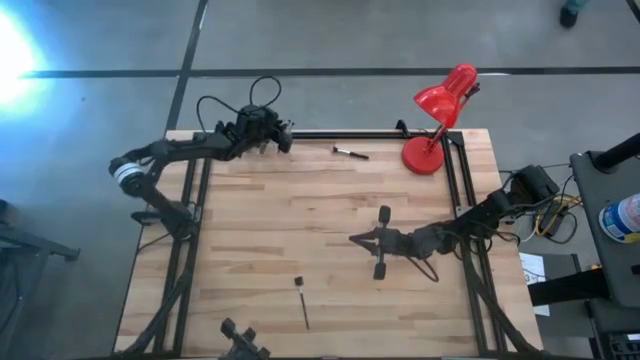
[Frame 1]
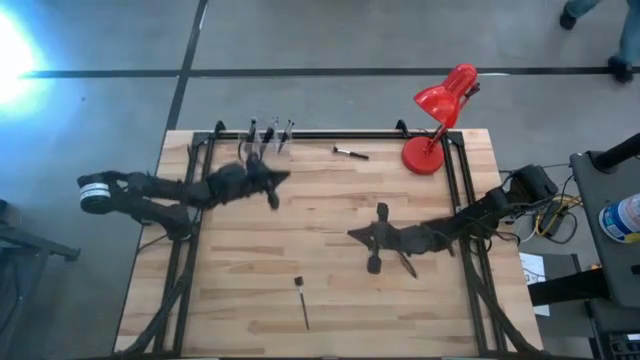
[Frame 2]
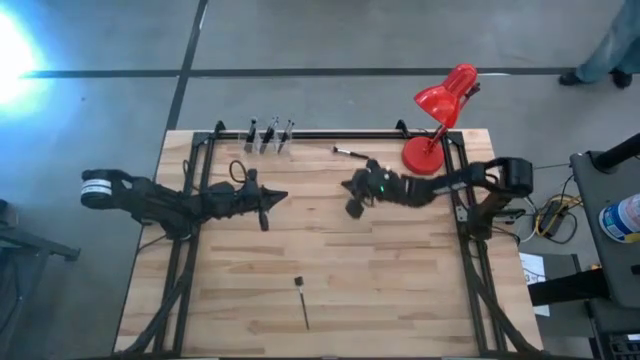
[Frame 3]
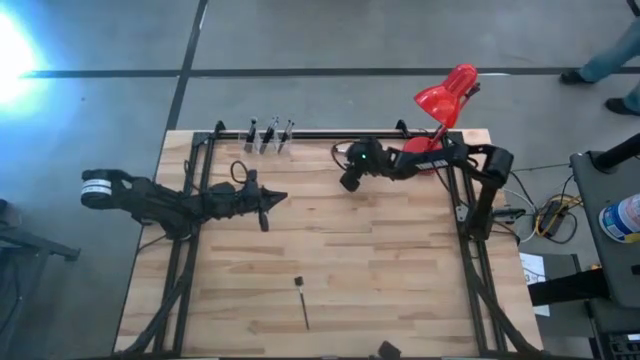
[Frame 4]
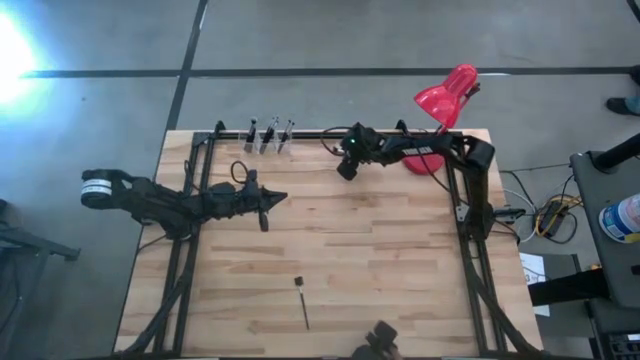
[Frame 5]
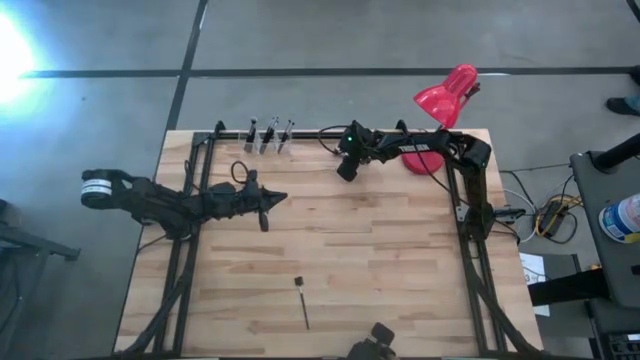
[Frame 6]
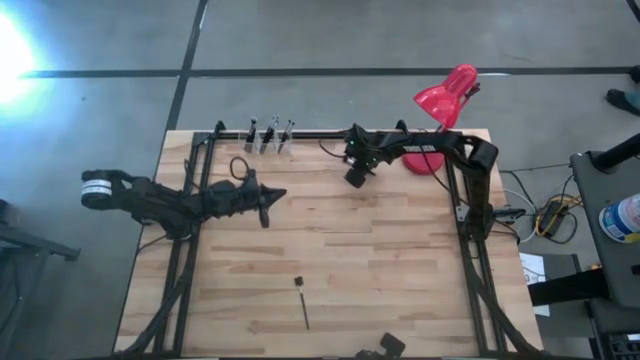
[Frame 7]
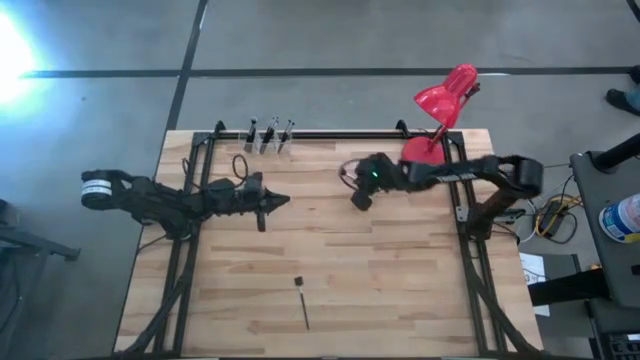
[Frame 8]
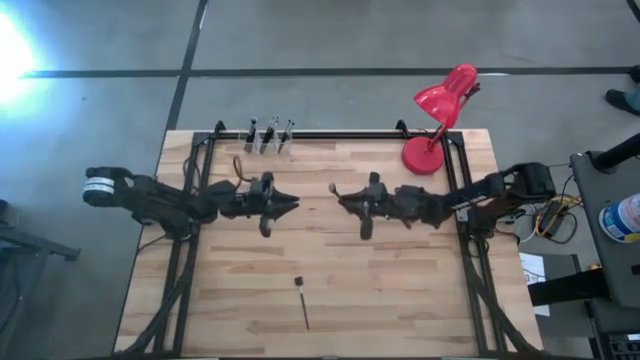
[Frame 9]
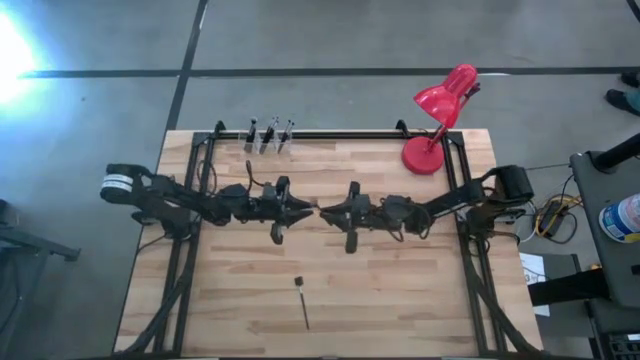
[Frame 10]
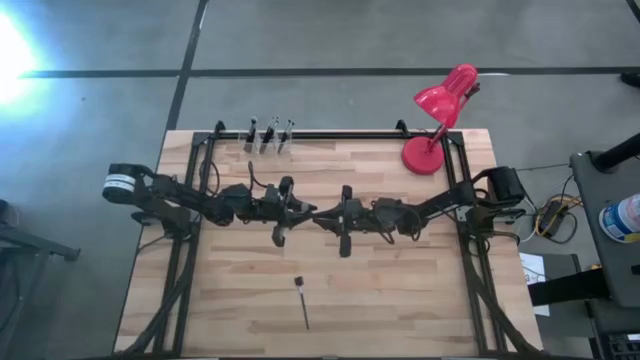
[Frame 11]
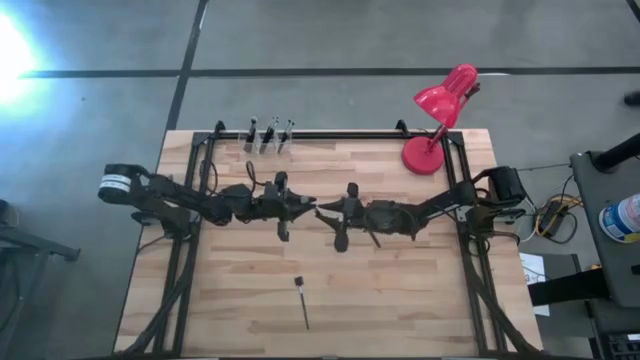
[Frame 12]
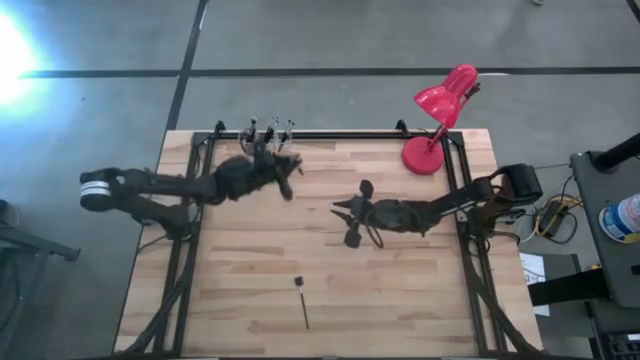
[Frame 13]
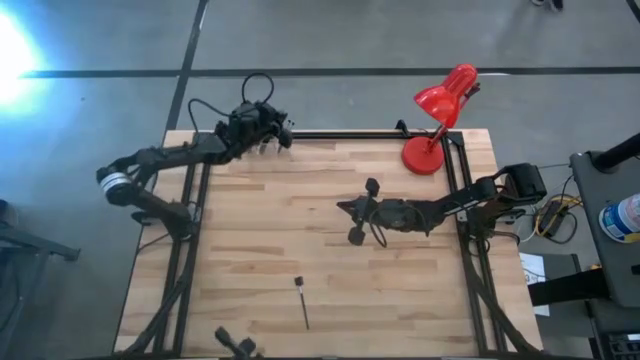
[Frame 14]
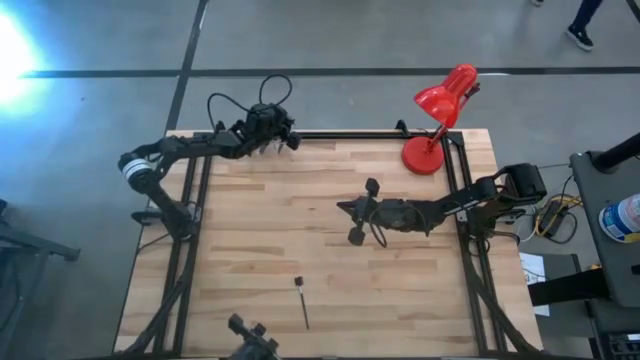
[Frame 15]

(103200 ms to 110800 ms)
Task: Put items in baskets/containers
Put the black powder brush into the transparent organizer

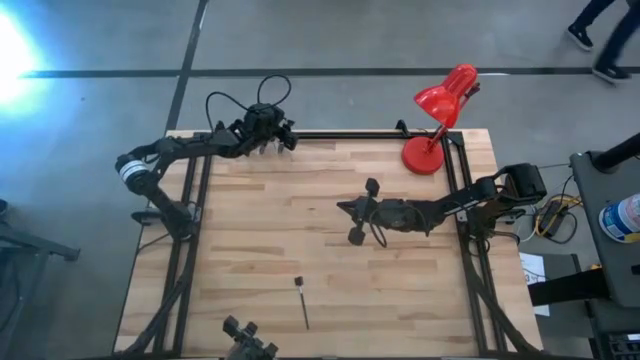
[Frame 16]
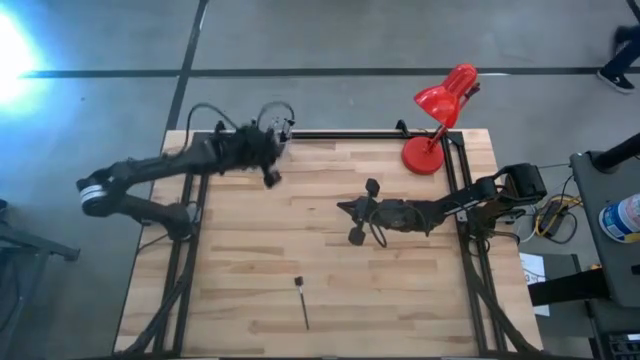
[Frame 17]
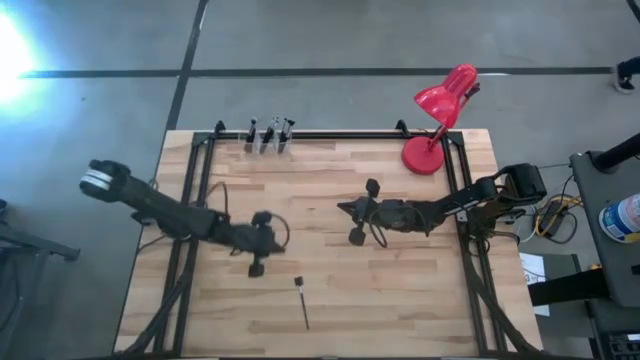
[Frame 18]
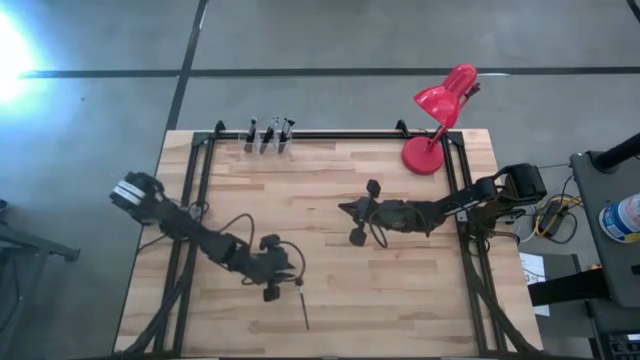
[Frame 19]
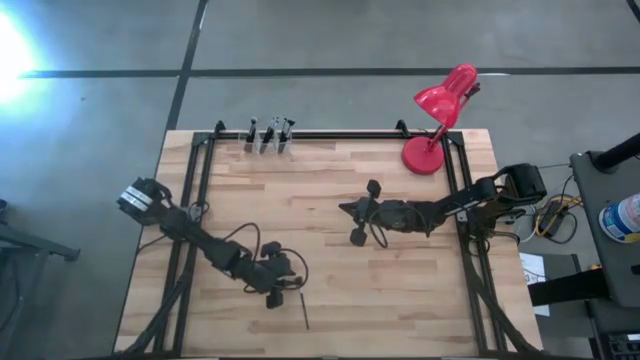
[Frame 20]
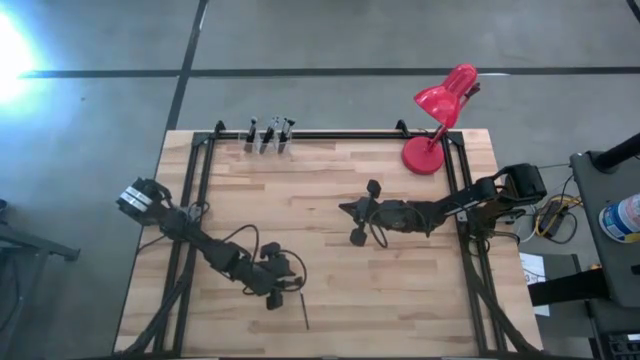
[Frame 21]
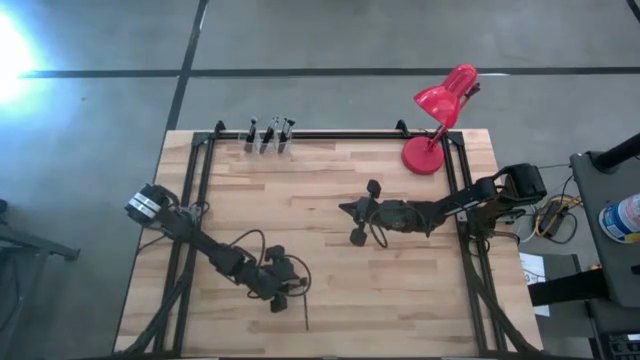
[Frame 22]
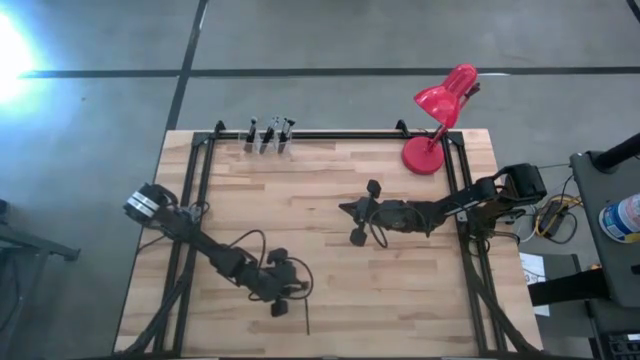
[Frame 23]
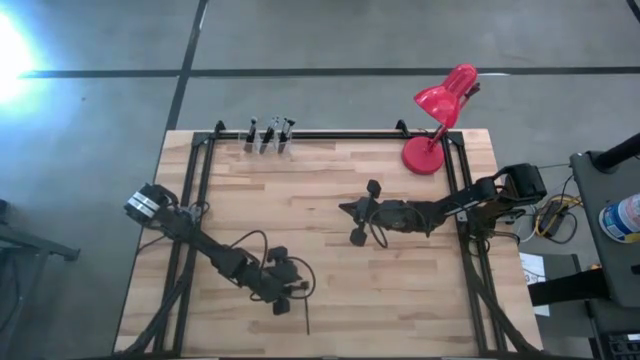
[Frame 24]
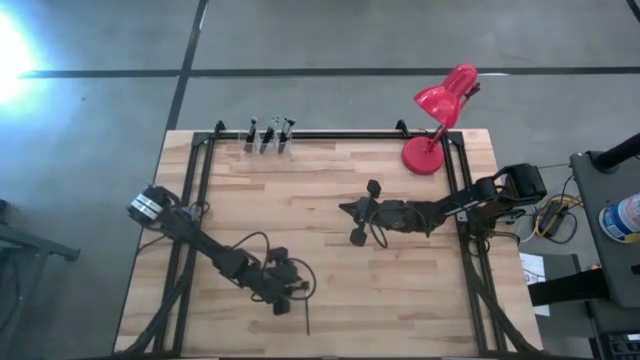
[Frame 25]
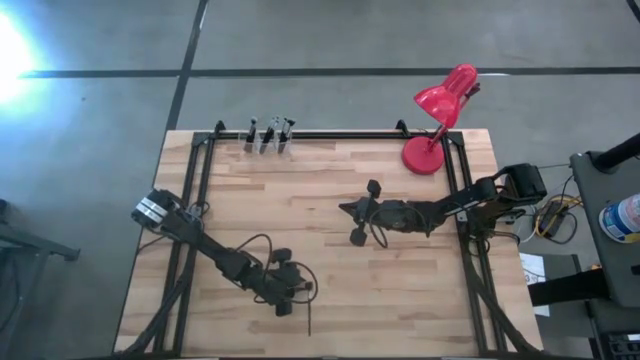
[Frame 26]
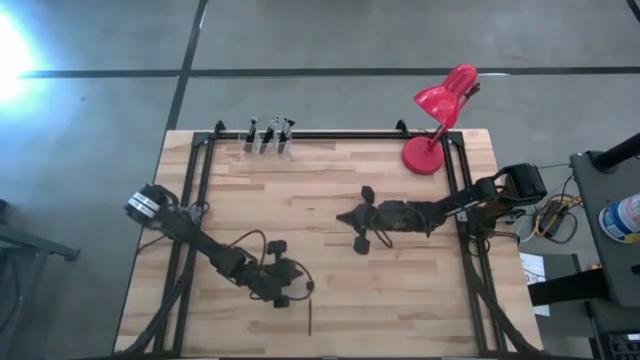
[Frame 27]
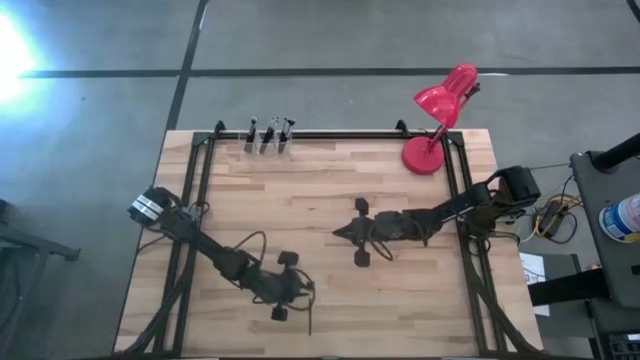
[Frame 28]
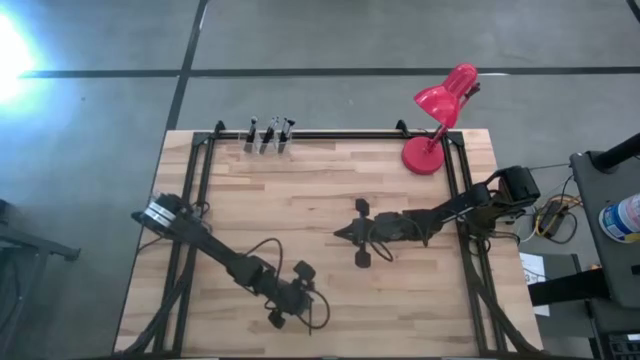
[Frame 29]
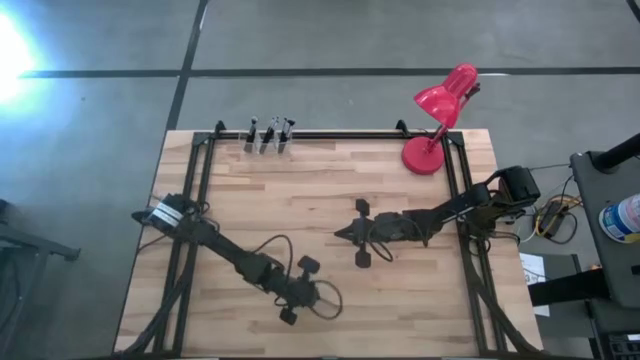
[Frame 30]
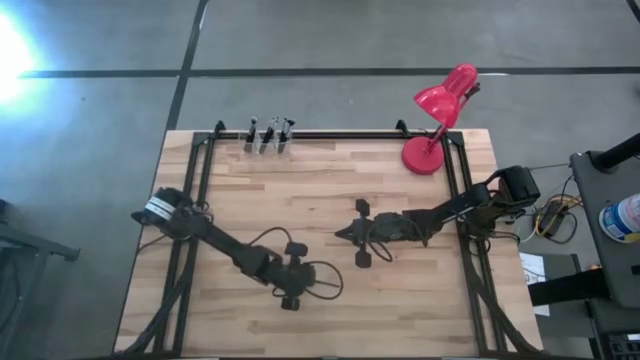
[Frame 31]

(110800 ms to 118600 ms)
Put the black eyebrow comb into the transparent organizer

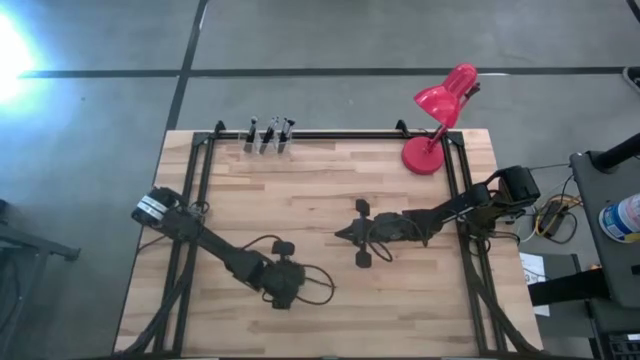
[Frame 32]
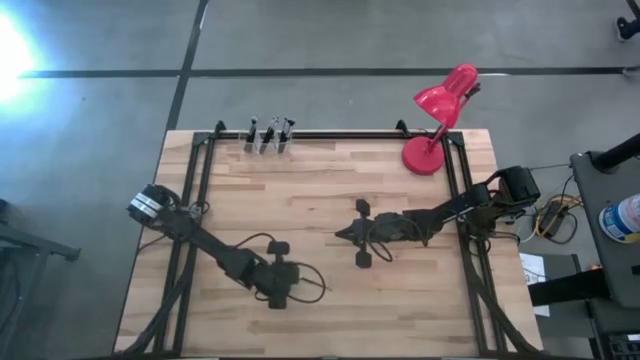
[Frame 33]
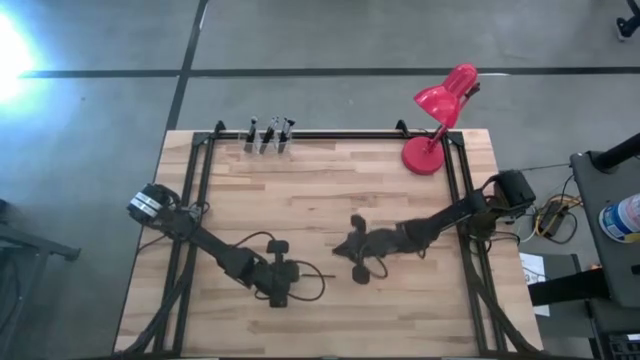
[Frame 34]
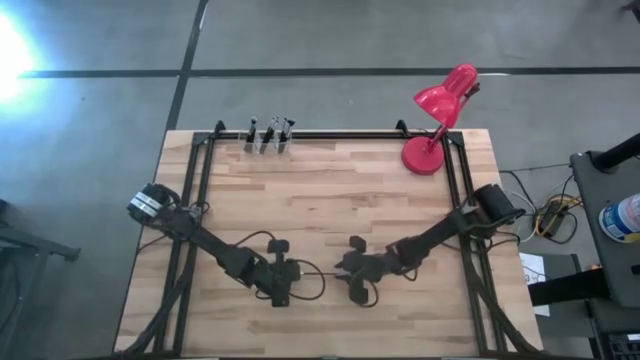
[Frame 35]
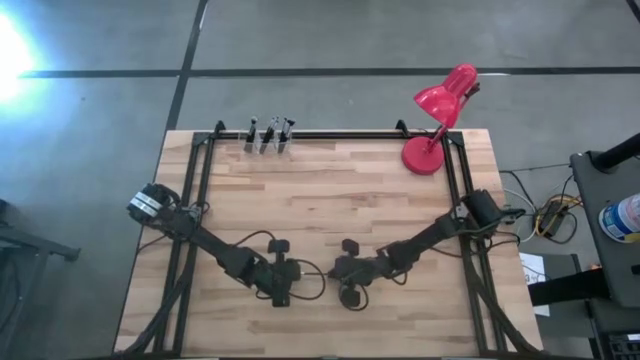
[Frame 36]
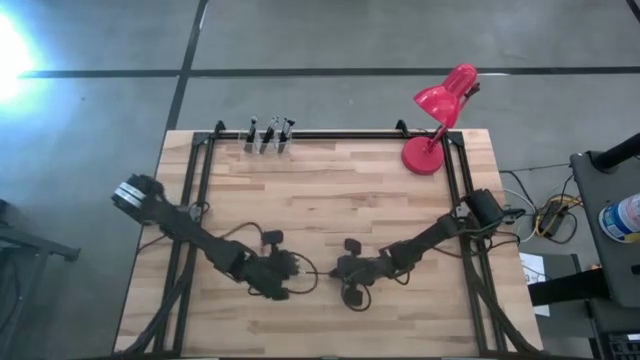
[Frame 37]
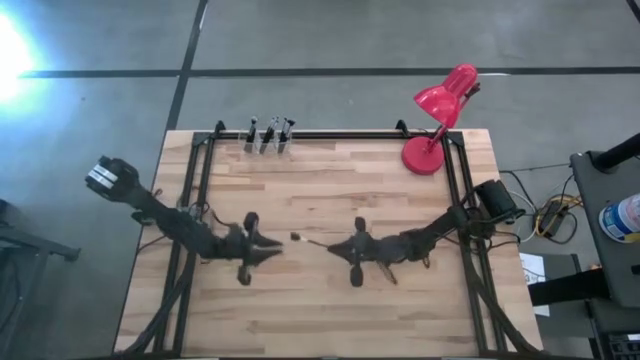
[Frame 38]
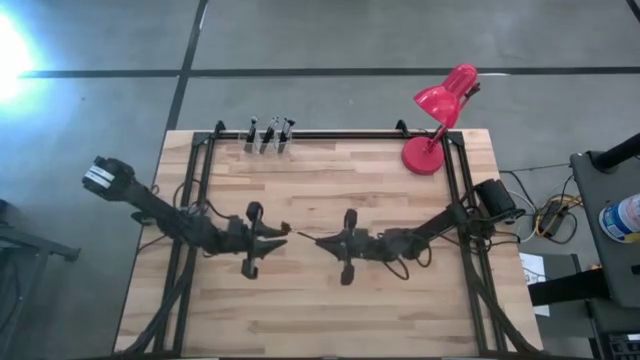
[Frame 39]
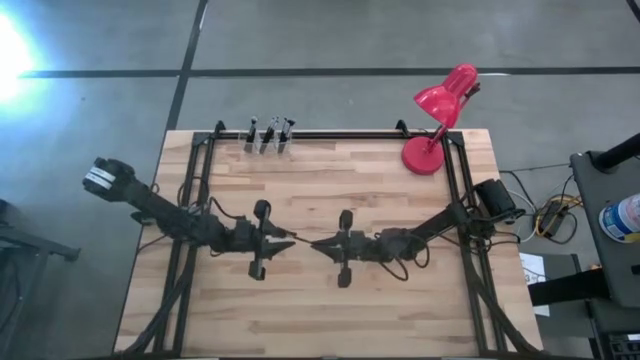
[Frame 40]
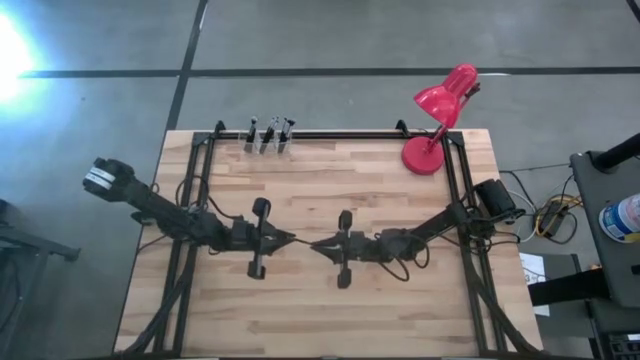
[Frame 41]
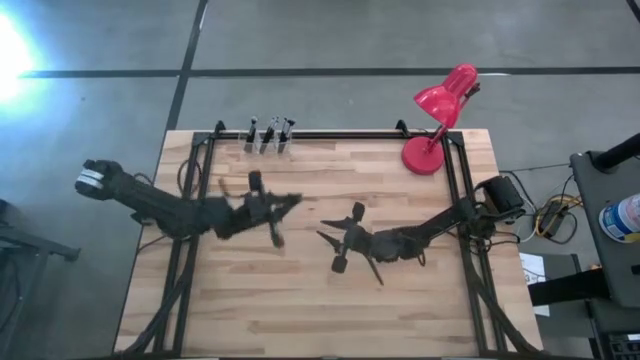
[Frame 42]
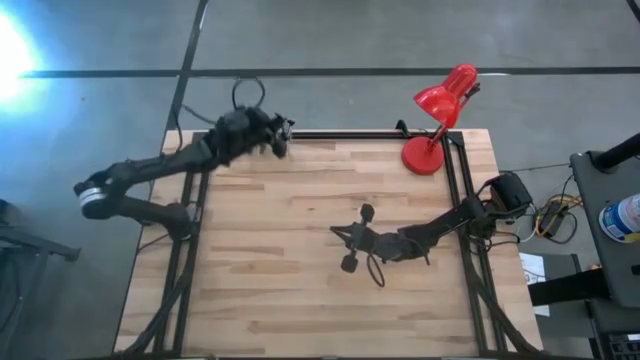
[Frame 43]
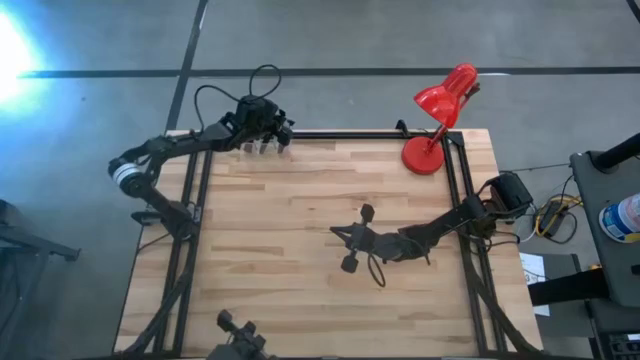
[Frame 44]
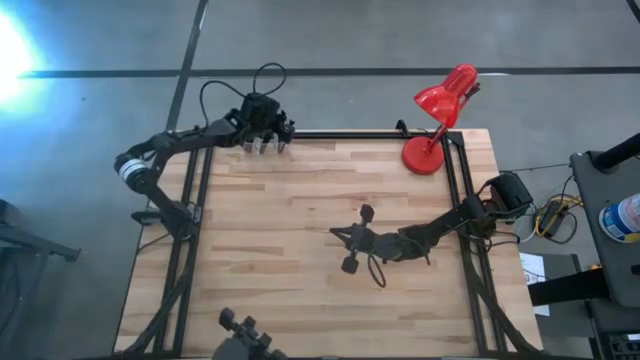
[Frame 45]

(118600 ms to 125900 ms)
Put the black eyebrow comb into the transparent organizer
